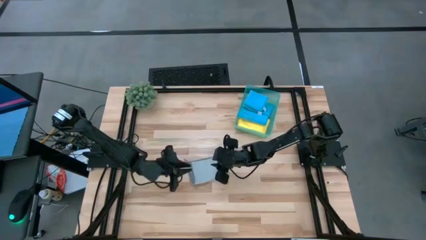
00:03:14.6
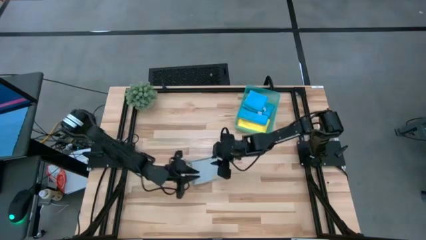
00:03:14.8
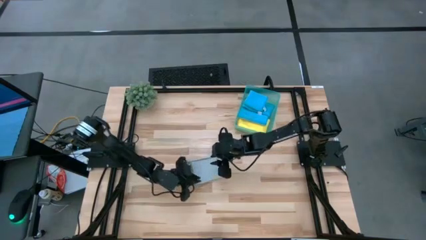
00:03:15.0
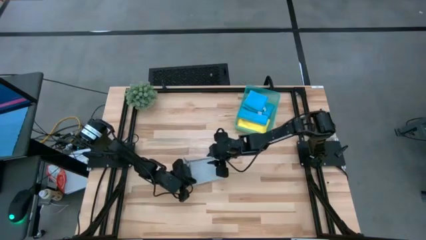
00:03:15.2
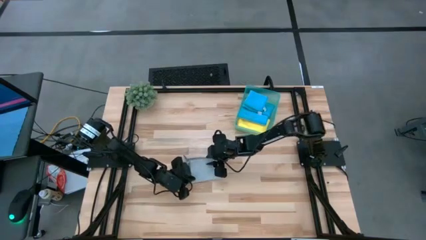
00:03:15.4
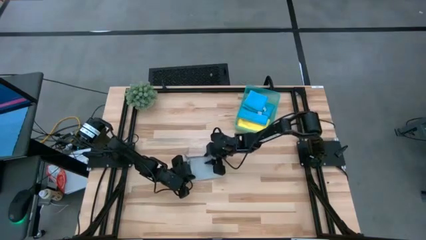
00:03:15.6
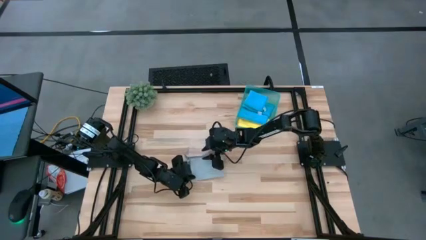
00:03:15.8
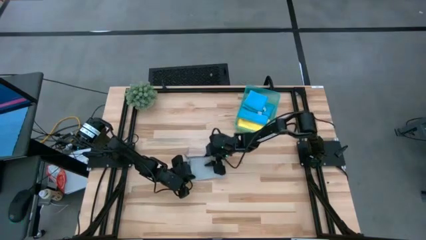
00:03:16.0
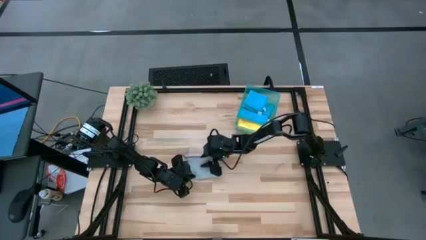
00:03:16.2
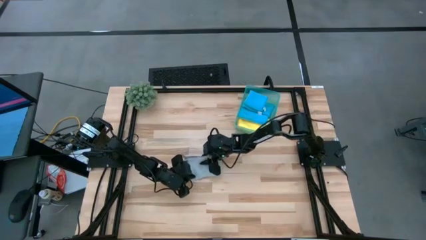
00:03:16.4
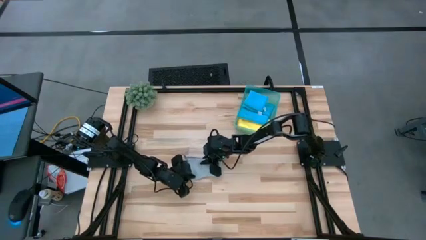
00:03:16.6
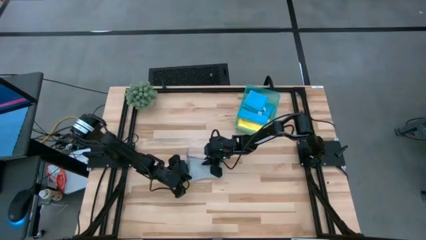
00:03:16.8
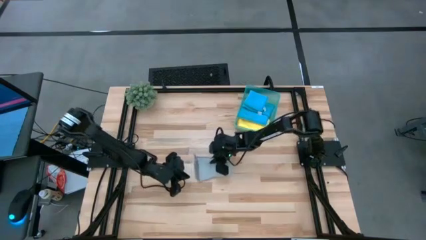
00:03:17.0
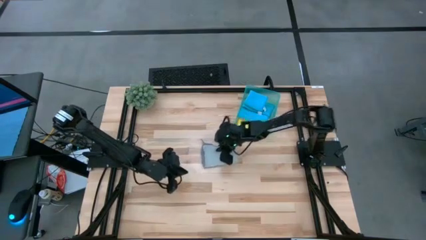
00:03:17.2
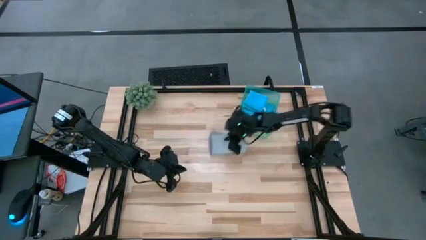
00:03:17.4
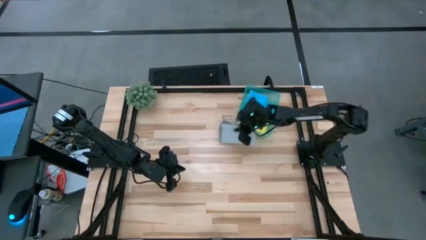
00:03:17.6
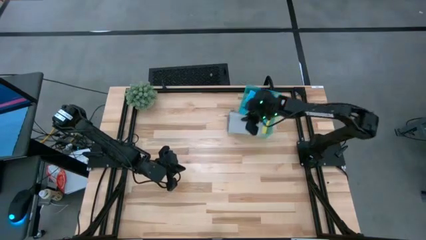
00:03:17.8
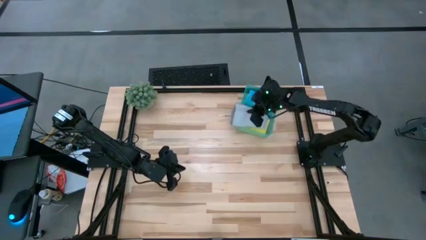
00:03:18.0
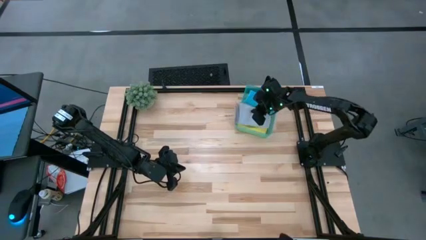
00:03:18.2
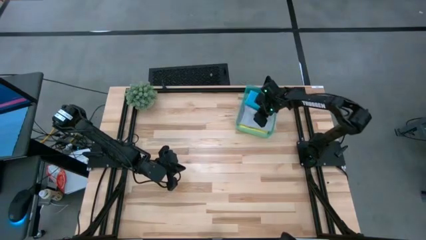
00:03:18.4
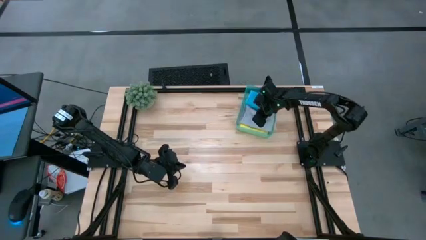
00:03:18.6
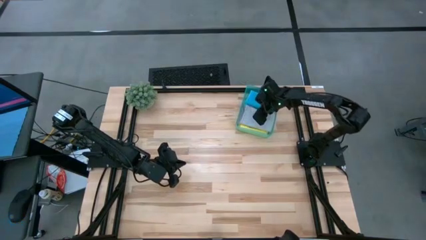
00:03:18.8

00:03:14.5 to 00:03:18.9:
Task: Fold microfiber towels
Put the gray towel into the blue bin

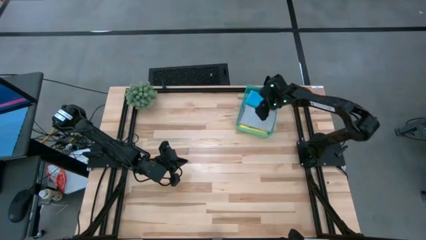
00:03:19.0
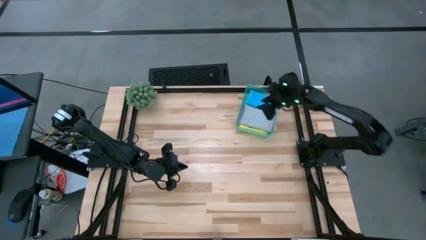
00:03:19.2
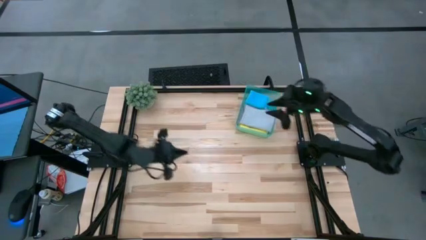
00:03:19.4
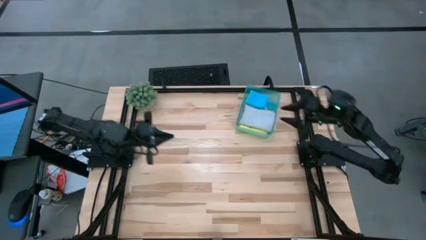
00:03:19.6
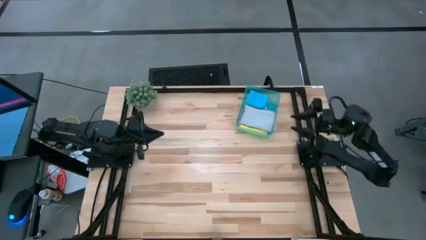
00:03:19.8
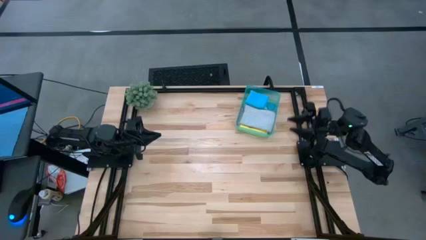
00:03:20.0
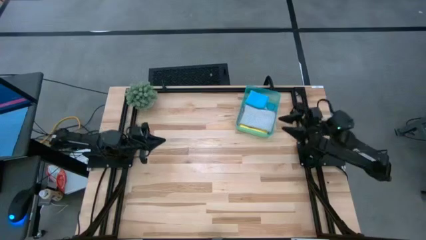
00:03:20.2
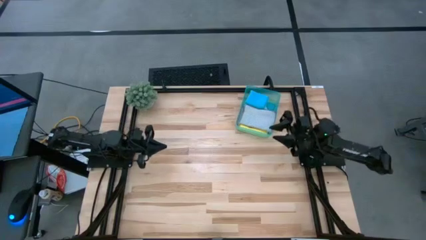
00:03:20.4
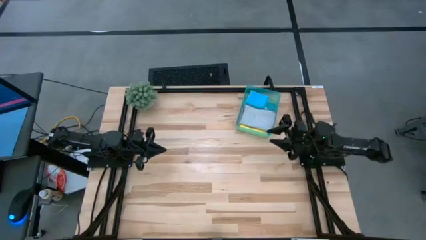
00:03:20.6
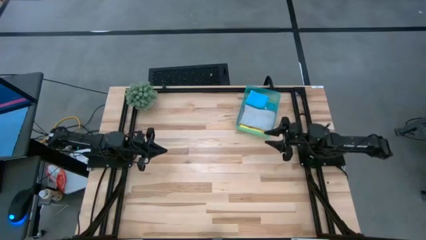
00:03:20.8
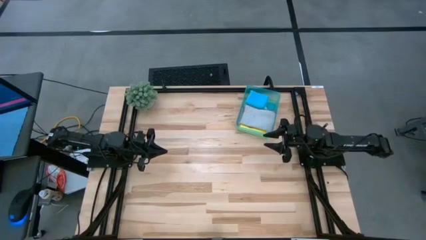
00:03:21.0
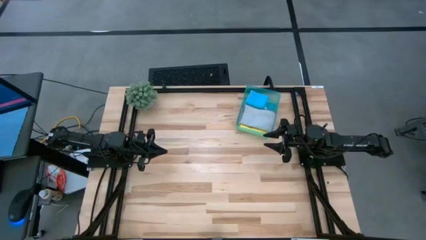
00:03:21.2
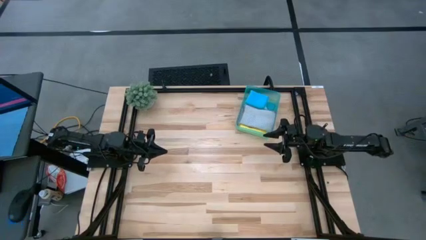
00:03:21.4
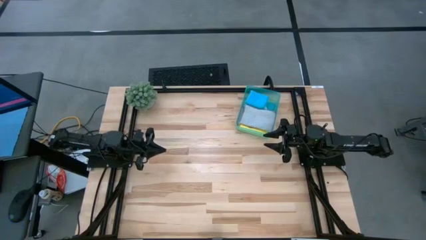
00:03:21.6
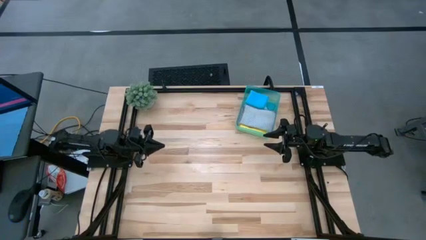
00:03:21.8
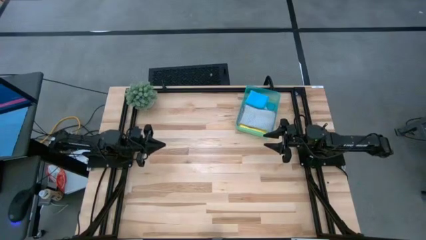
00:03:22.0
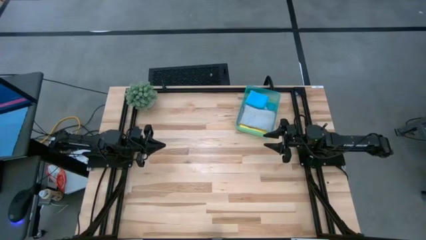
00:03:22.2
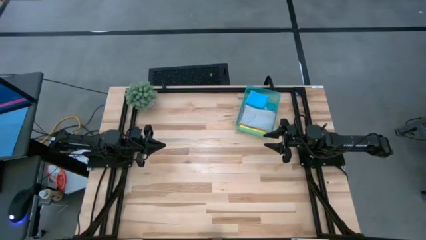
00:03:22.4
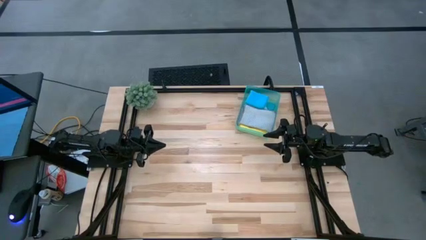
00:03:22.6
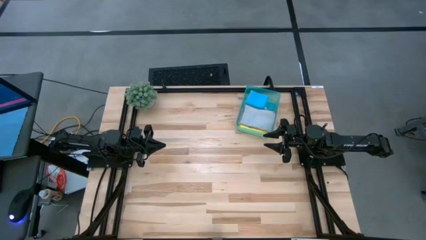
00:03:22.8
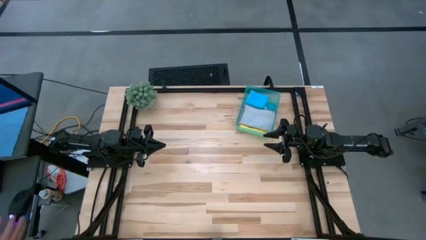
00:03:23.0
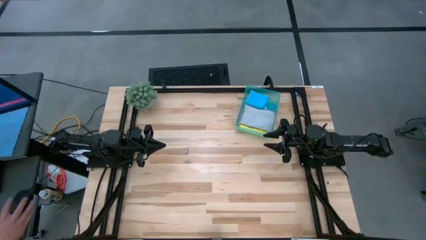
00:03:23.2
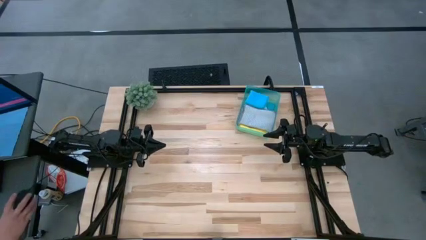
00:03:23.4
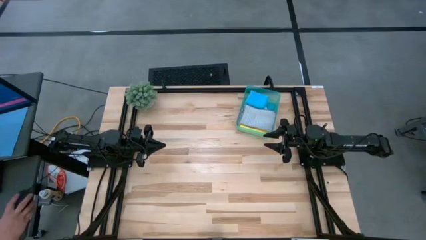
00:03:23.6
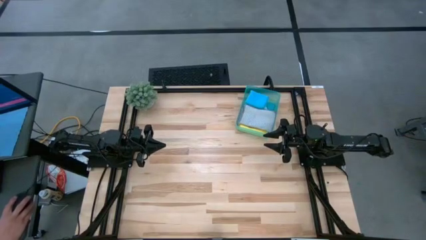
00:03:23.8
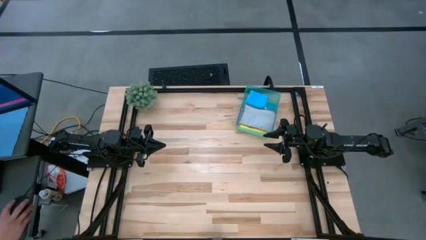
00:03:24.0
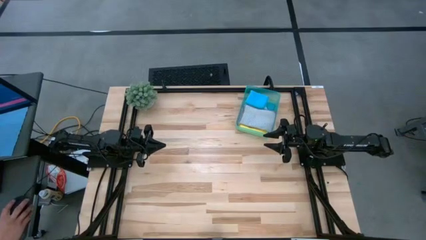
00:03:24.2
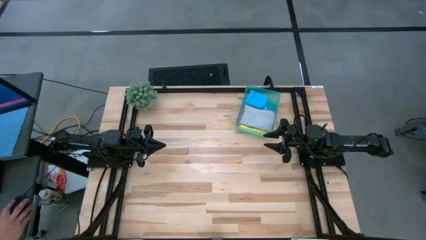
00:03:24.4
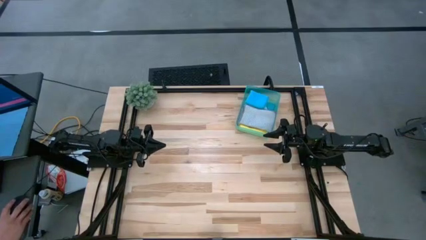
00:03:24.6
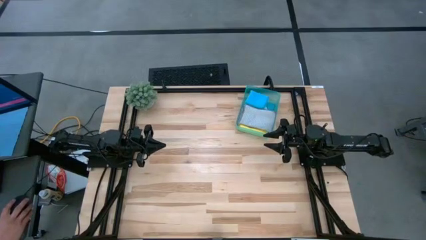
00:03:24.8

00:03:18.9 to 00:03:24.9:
Return to Home Position

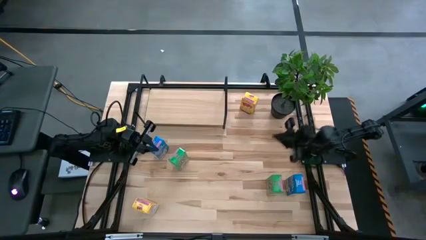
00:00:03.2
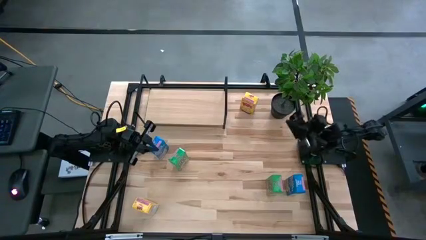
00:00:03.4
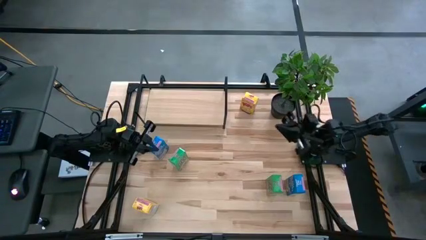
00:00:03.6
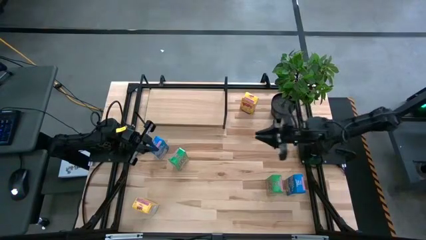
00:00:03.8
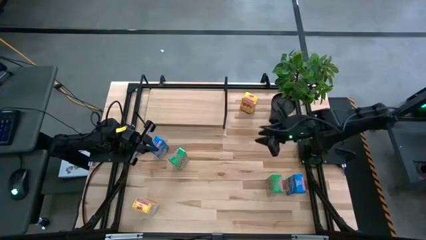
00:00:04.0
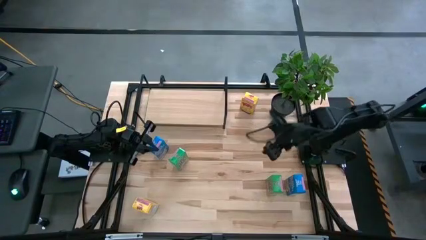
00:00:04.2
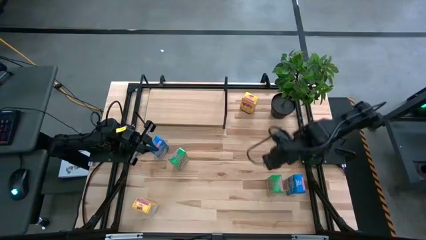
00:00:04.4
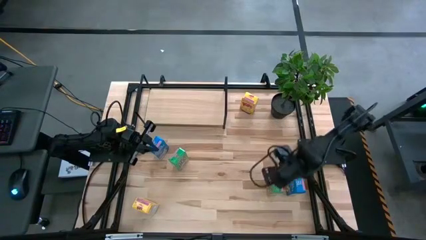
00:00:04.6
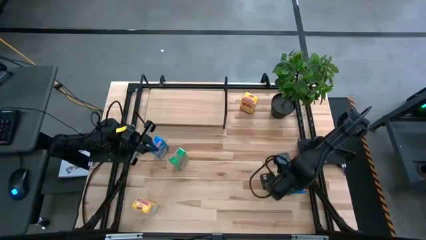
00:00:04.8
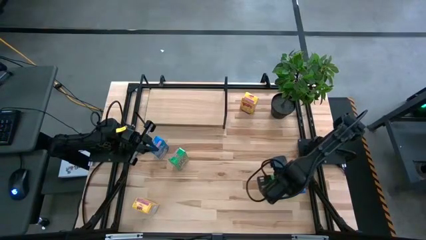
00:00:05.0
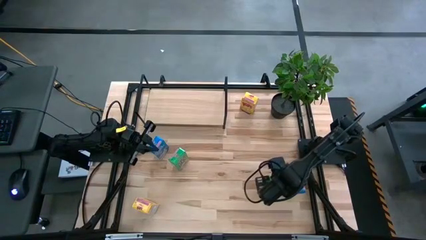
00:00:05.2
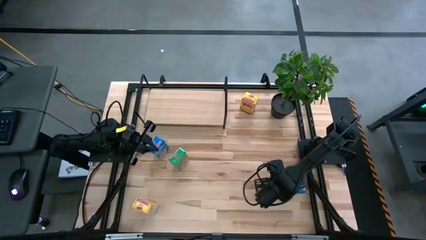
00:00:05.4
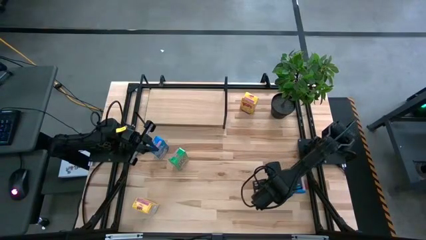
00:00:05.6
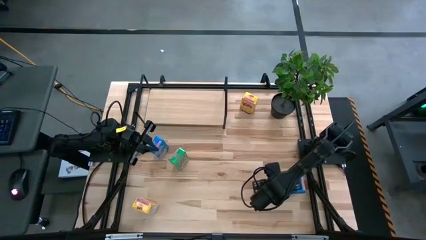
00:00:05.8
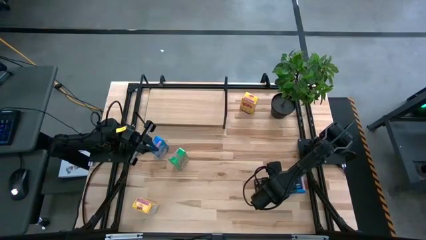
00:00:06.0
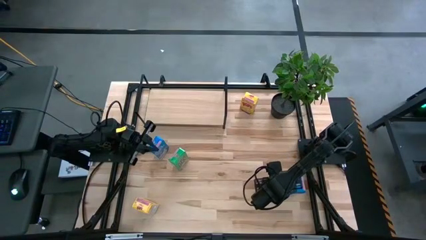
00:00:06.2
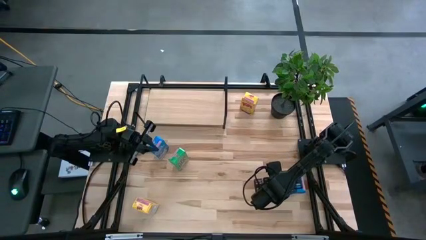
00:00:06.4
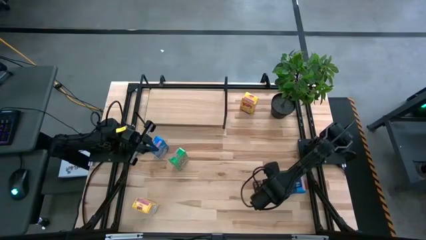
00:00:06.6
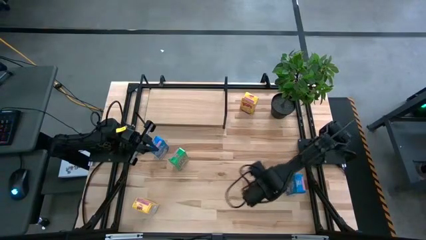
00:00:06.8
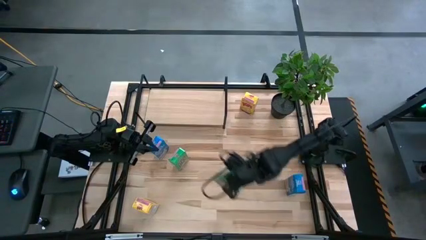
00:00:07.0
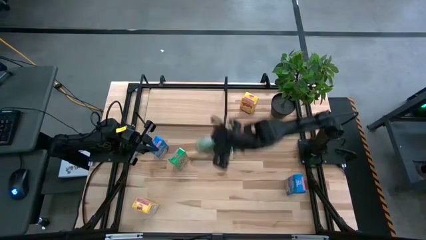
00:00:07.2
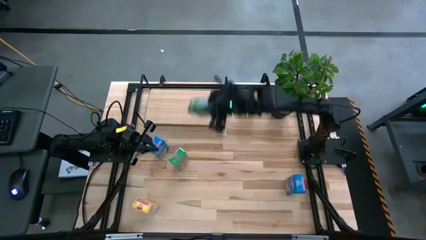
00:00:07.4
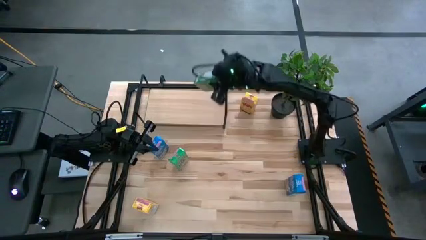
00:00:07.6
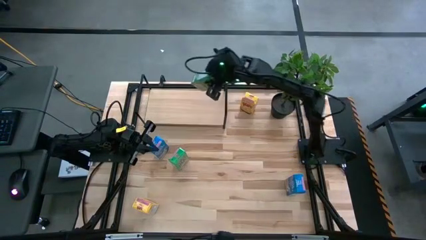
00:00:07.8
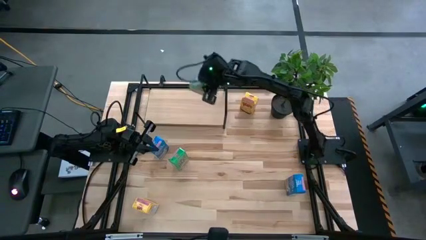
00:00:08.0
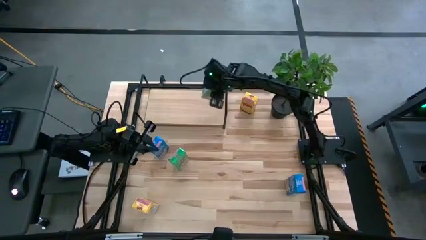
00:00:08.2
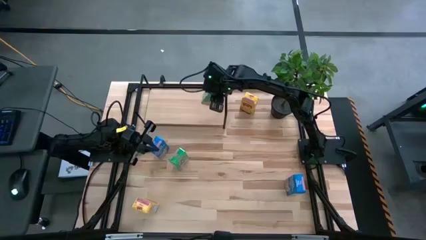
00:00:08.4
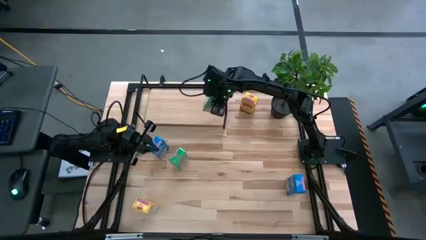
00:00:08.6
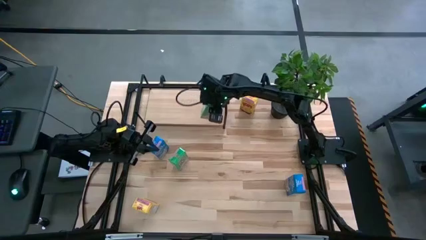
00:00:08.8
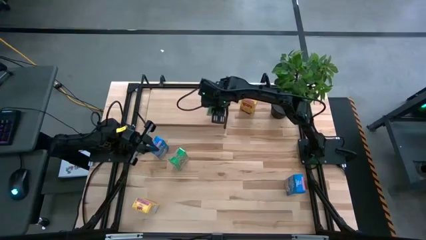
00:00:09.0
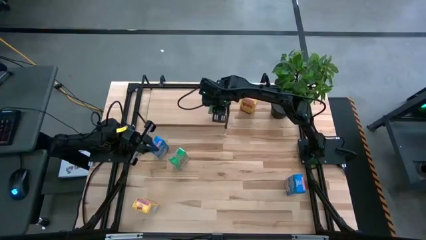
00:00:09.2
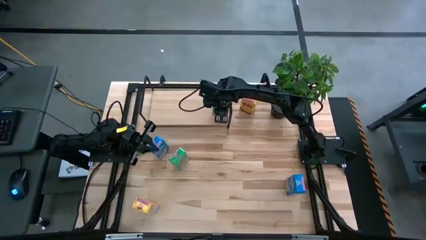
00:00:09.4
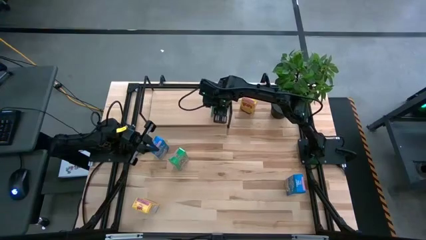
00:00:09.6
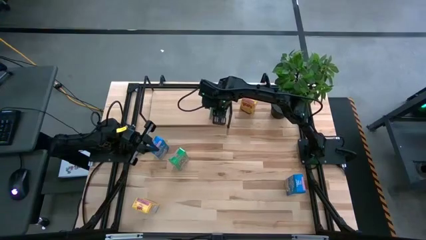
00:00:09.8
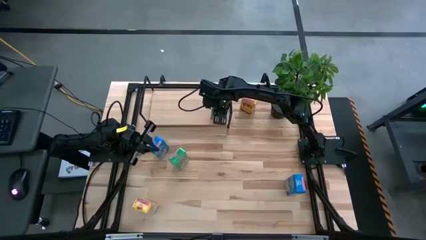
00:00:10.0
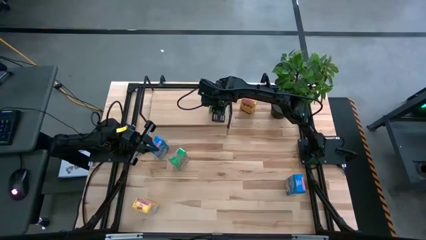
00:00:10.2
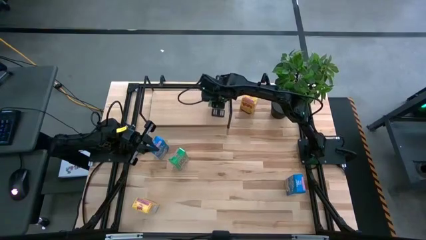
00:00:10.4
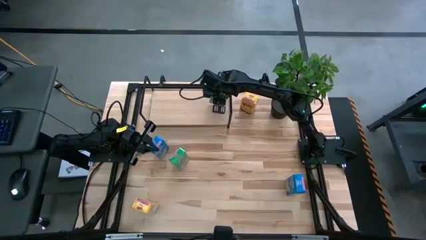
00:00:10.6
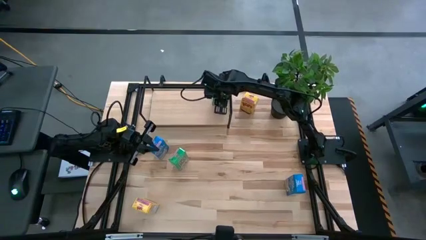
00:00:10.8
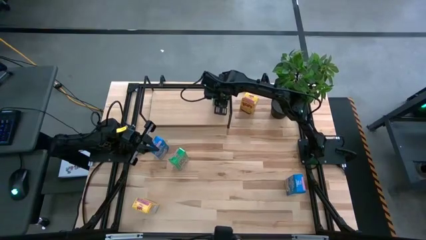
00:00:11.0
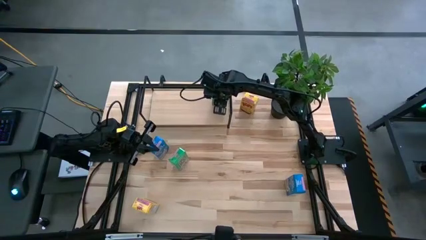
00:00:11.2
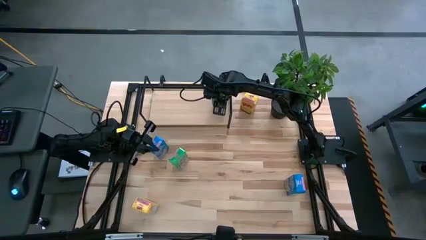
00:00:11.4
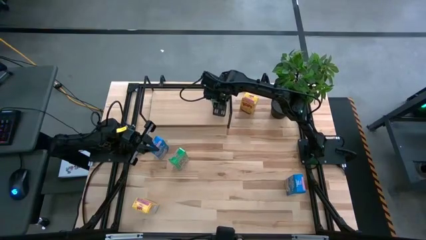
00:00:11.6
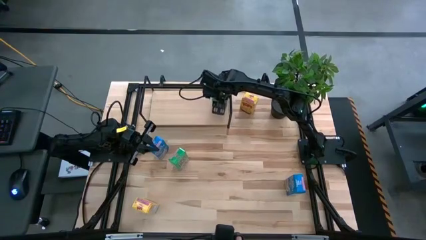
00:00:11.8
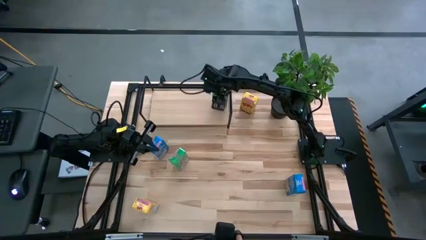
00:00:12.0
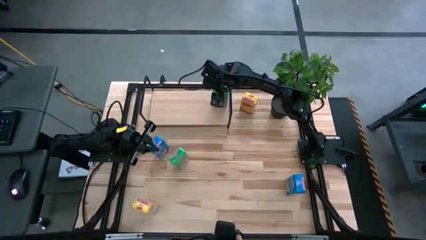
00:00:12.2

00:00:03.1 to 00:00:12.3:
Task: Stack cereal on shelf
Put the right green cereal box on the shelf
